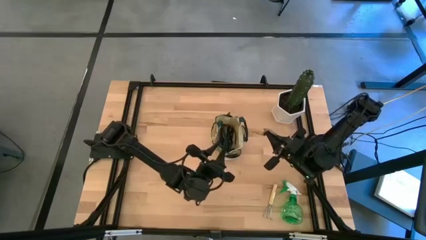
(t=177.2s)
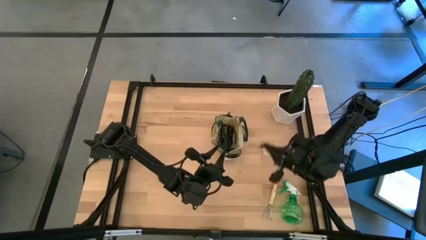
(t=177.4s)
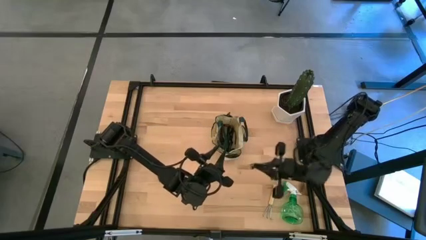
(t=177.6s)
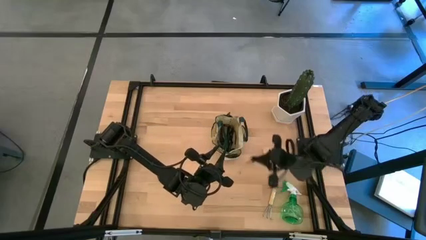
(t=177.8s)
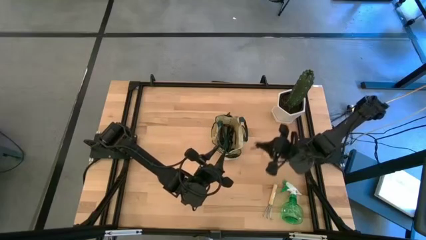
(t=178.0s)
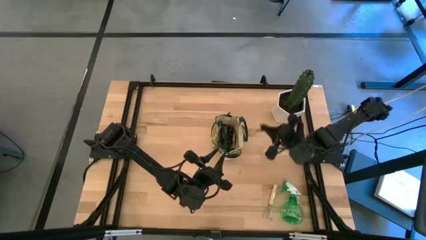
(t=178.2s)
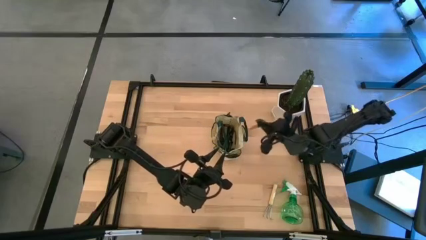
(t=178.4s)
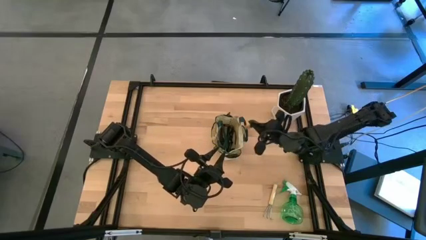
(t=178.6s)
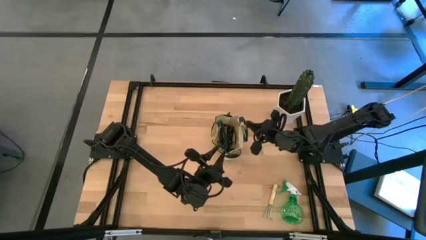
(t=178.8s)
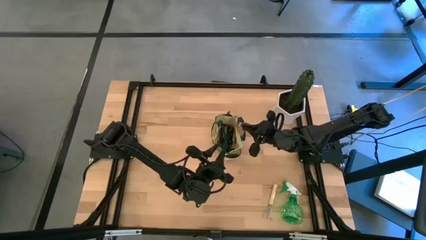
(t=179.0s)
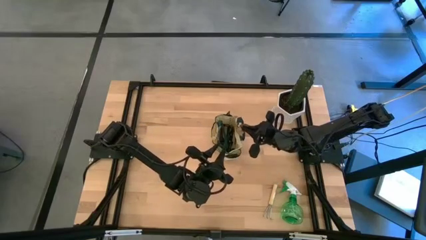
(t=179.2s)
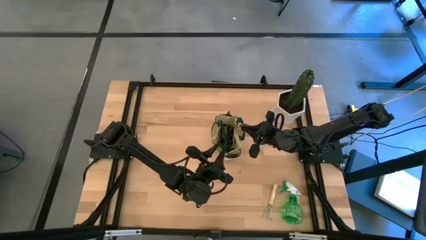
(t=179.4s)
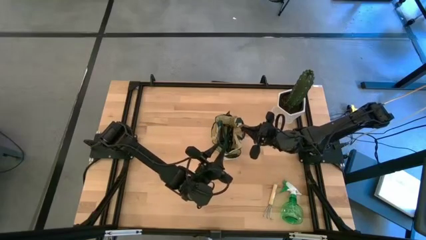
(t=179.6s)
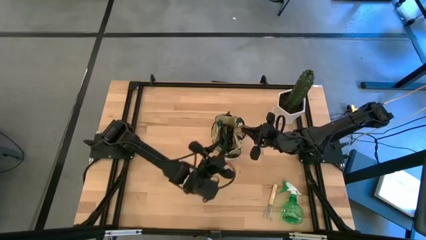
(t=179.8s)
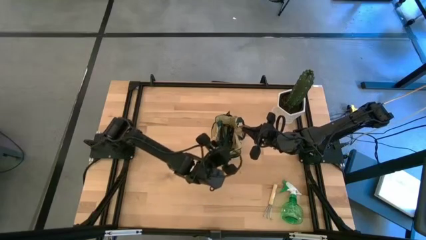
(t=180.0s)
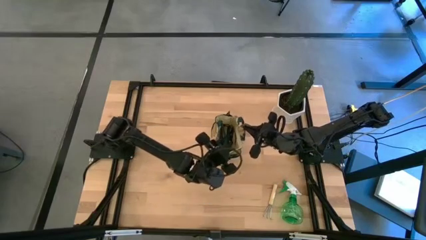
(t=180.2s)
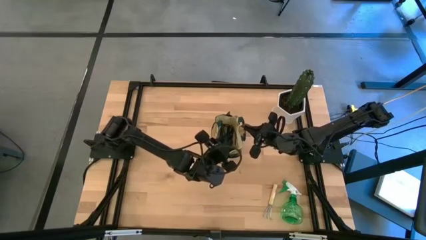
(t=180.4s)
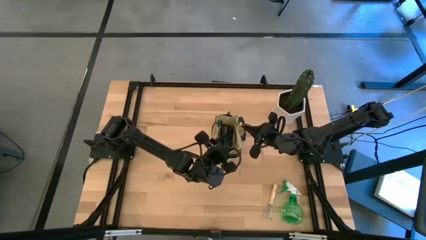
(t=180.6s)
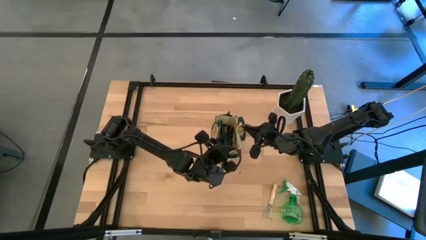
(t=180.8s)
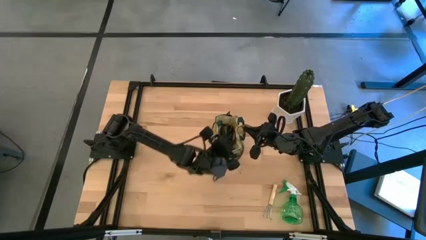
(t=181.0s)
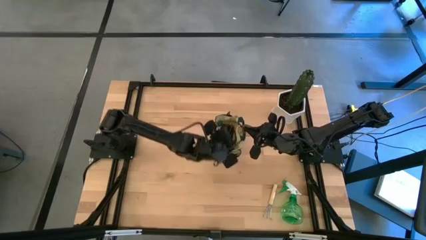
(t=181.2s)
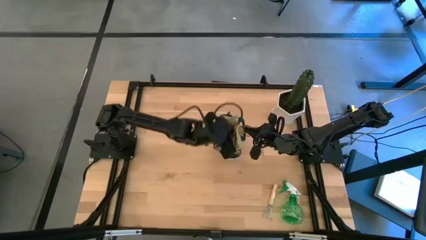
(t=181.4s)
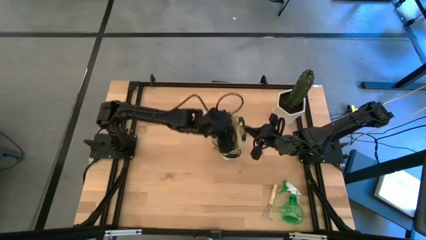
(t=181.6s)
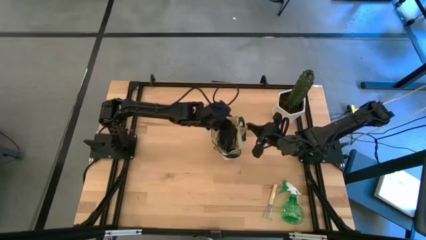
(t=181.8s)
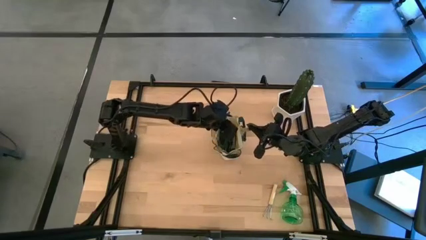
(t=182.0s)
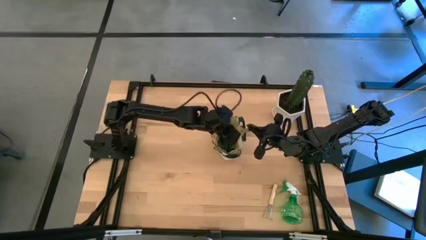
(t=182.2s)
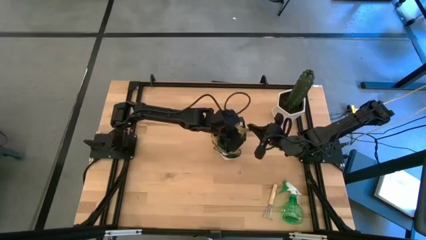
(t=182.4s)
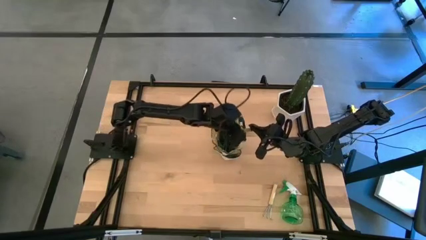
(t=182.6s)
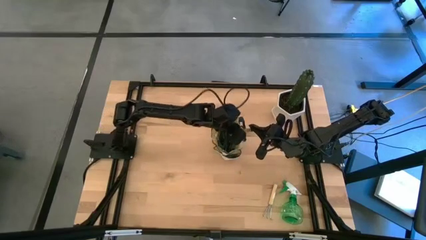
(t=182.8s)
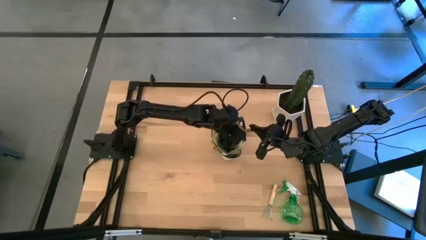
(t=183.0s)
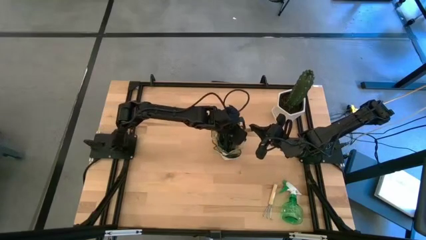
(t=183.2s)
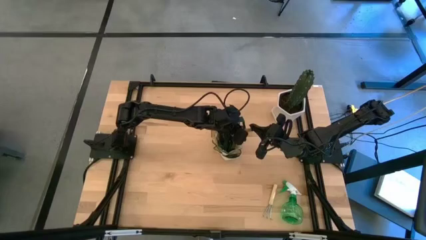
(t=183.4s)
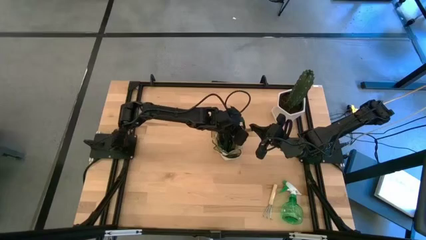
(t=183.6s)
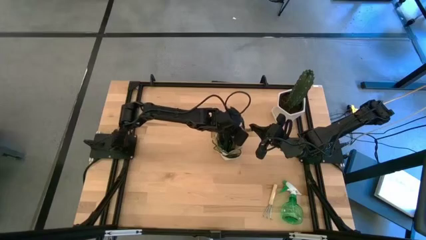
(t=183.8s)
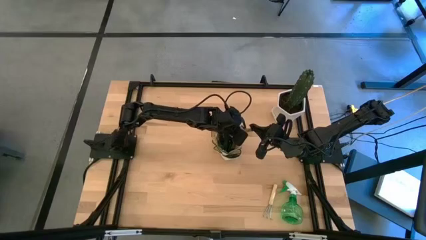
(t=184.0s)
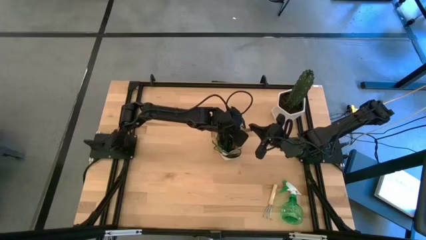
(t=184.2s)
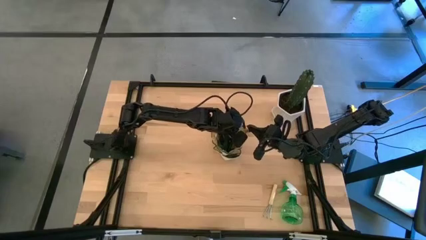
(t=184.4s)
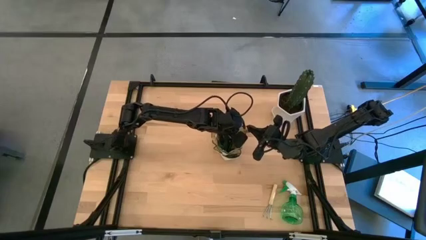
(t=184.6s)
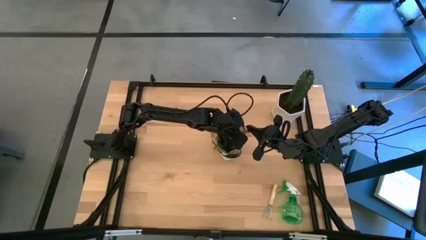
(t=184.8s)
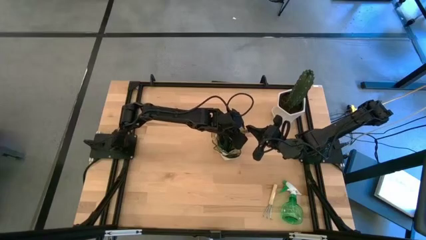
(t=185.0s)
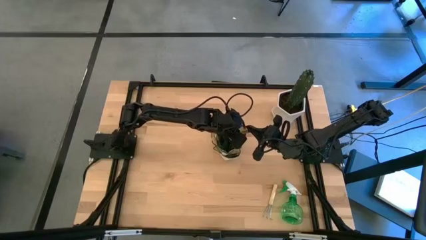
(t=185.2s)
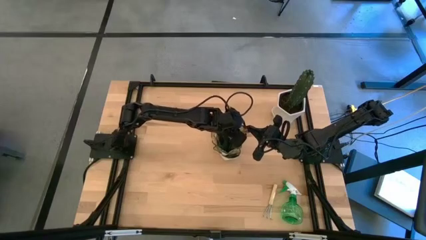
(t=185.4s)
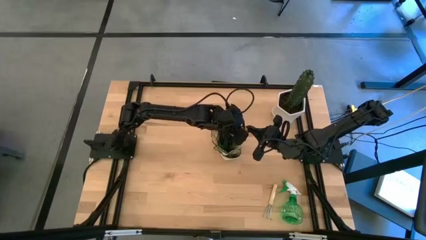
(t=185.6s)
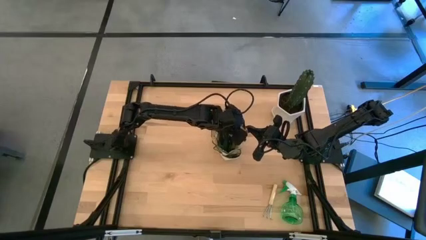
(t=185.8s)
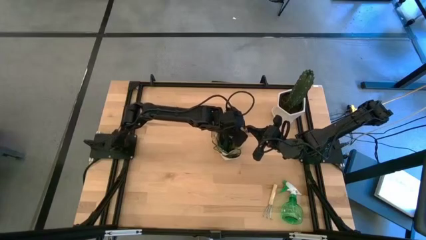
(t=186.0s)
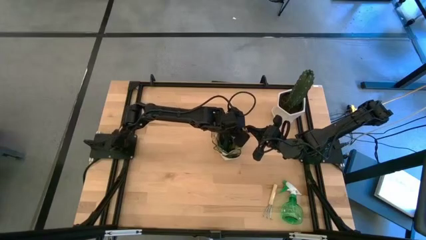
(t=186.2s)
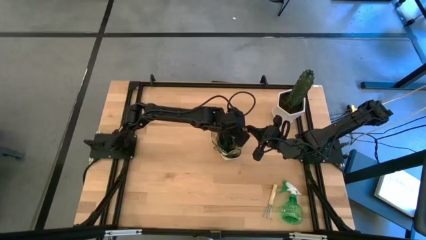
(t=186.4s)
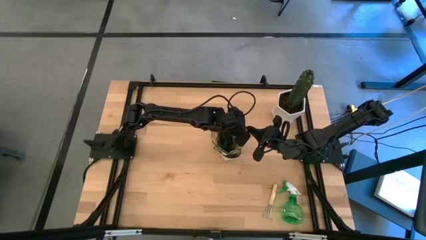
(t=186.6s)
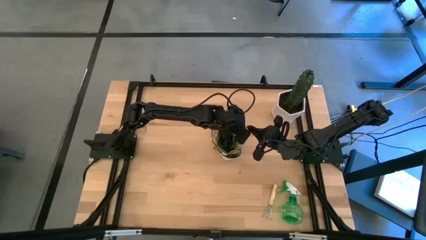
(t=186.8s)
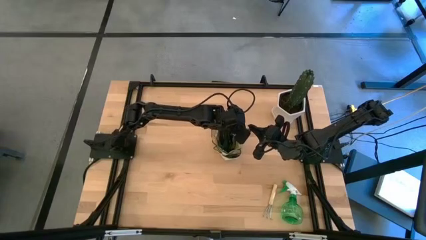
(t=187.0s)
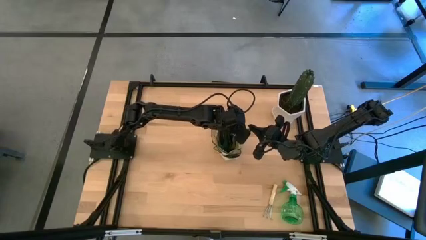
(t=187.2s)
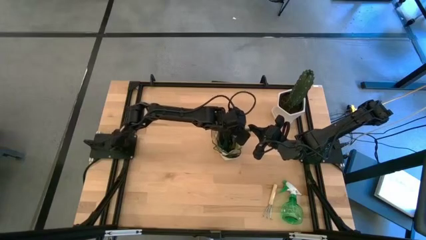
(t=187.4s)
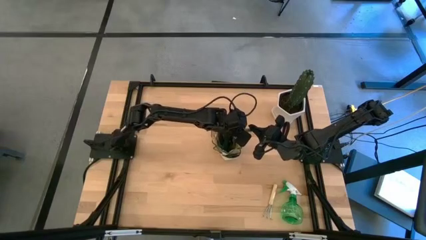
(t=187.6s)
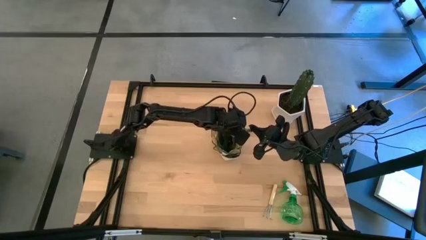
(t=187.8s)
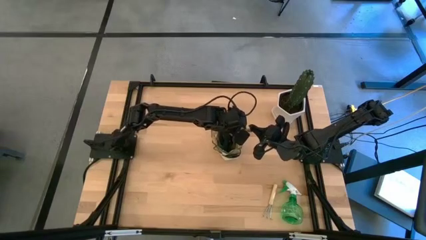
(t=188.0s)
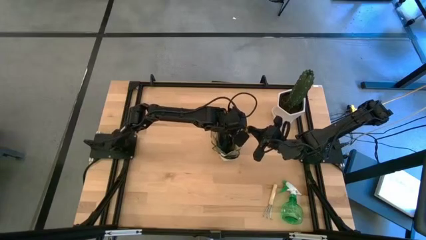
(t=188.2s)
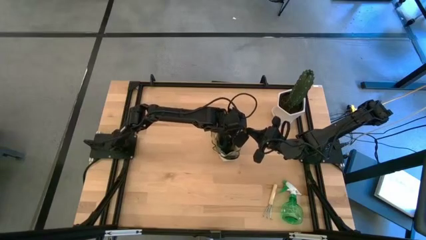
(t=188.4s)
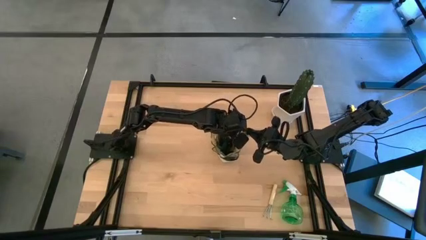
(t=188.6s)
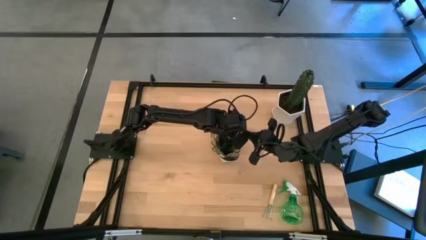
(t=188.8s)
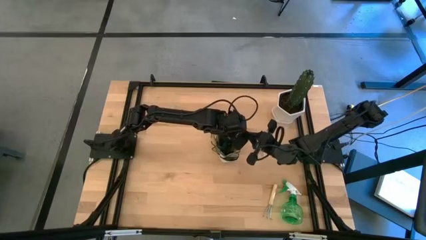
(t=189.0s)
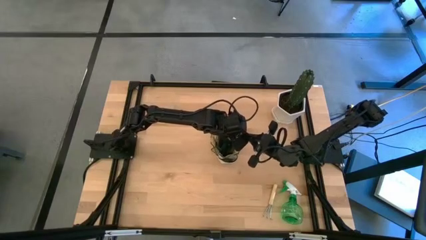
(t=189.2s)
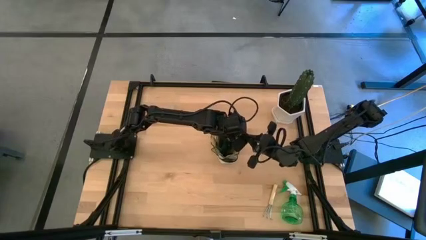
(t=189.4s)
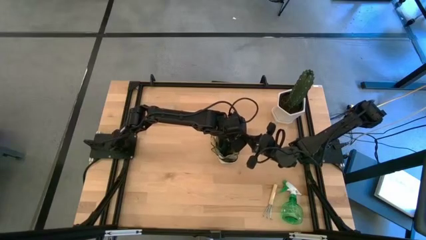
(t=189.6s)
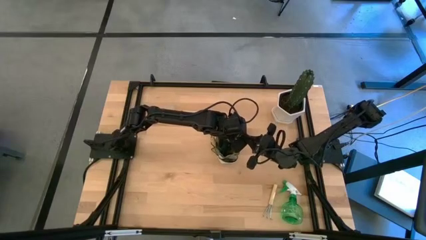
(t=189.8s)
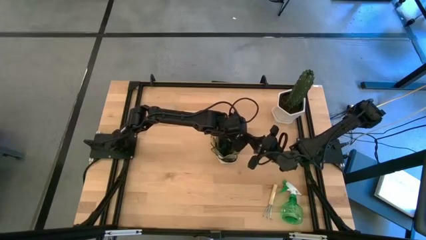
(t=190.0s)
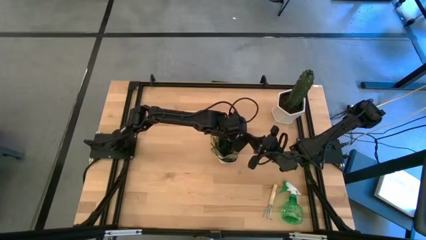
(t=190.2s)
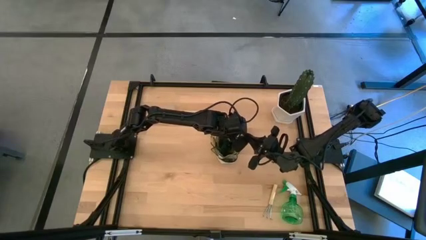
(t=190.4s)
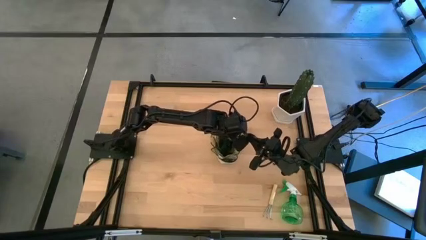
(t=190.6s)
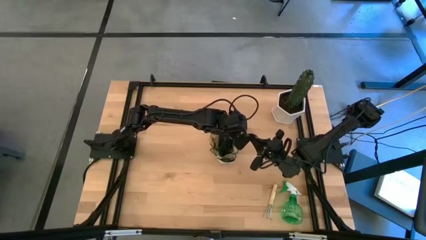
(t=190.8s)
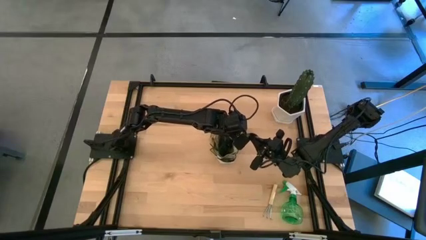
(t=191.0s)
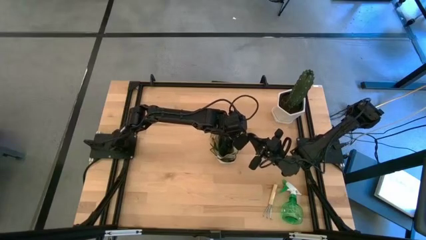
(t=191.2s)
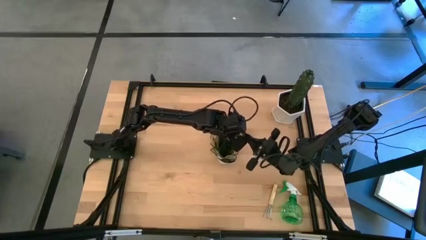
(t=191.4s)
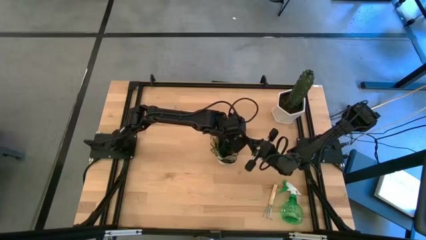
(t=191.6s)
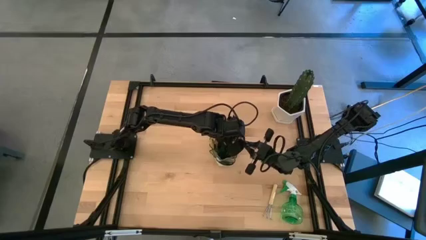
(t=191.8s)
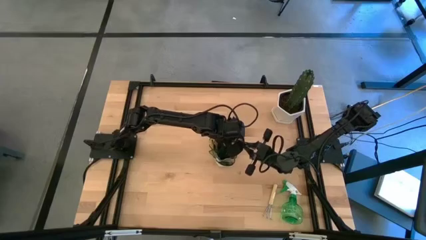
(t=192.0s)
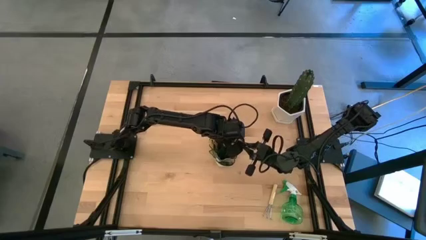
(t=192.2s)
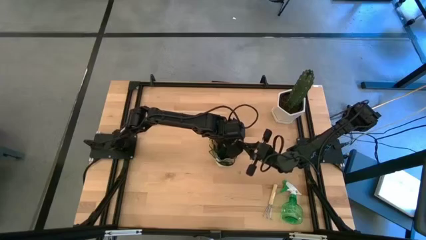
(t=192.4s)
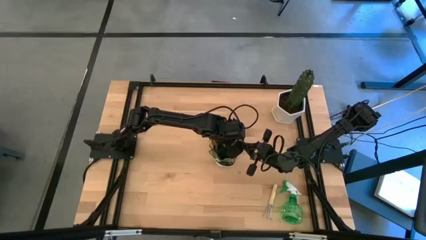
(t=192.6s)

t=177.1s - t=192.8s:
Task: Pick & Place Garden tools in Gardening bag
Put the brown trowel into the green gardening bag
